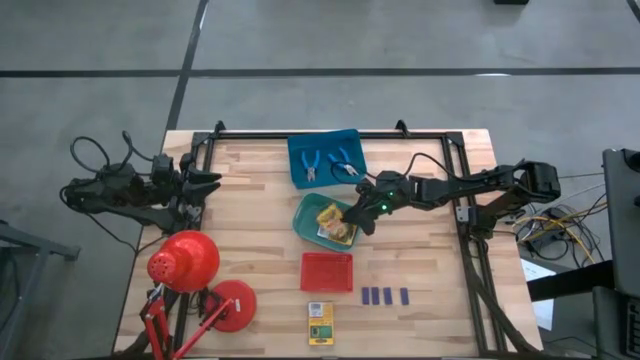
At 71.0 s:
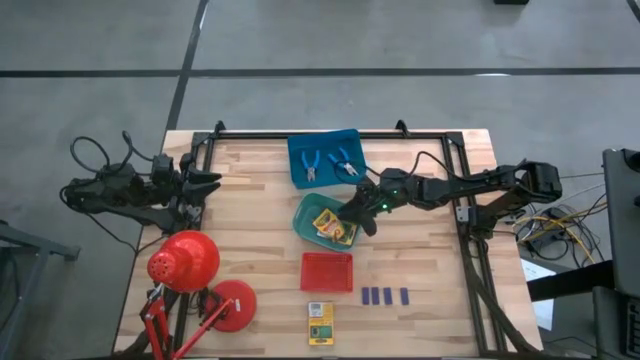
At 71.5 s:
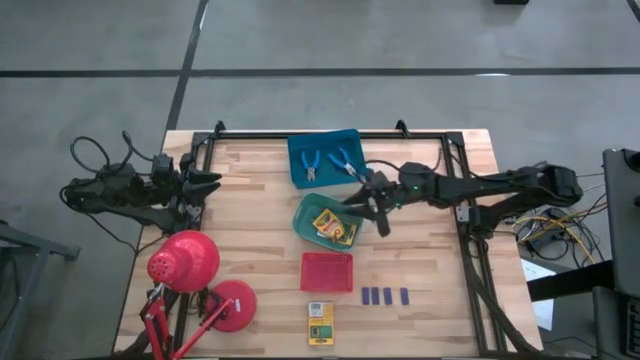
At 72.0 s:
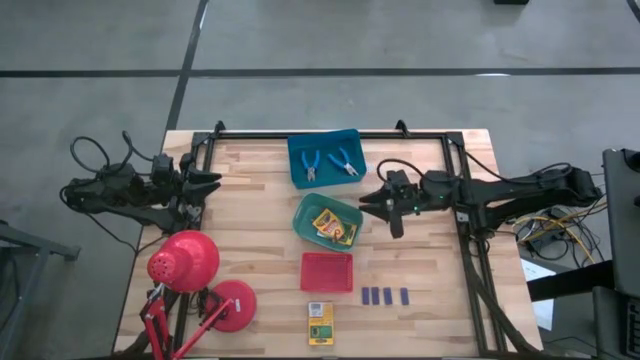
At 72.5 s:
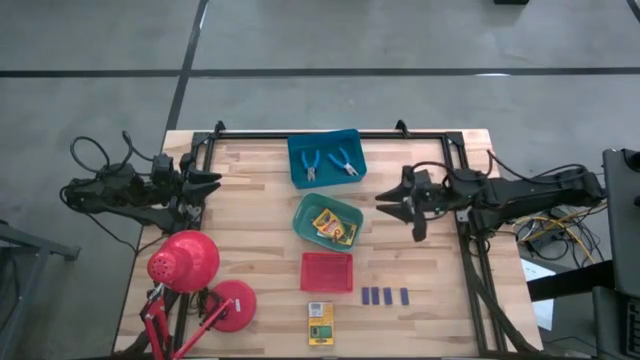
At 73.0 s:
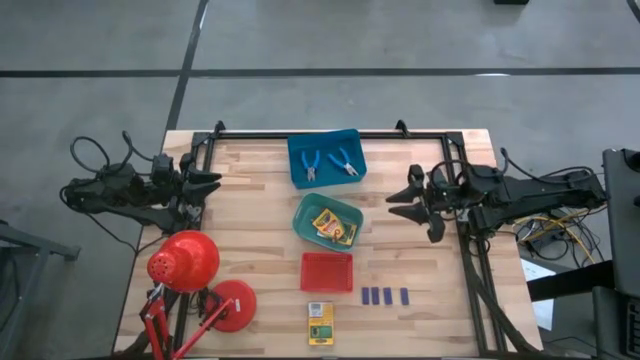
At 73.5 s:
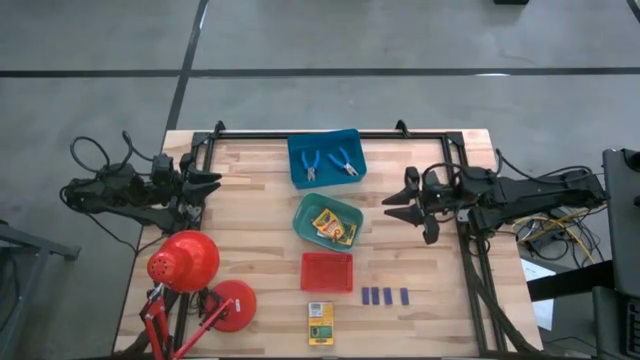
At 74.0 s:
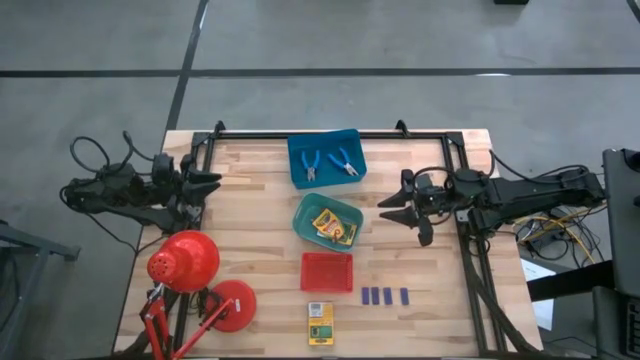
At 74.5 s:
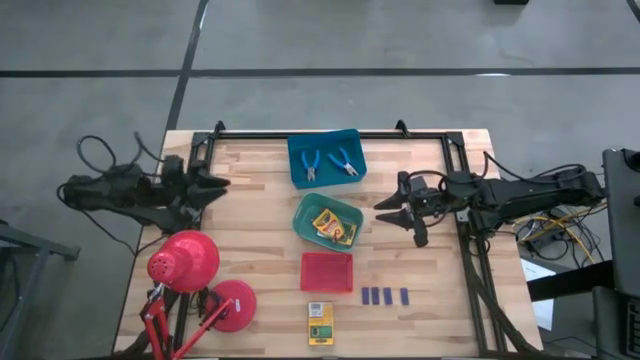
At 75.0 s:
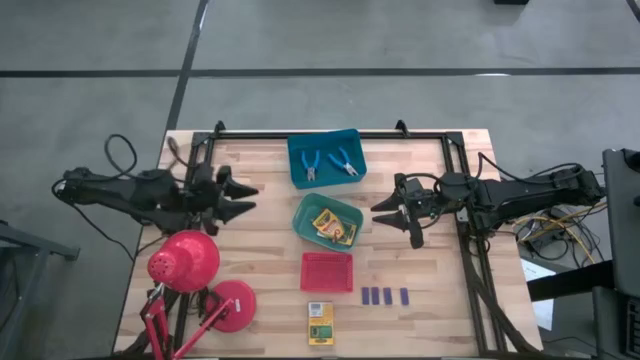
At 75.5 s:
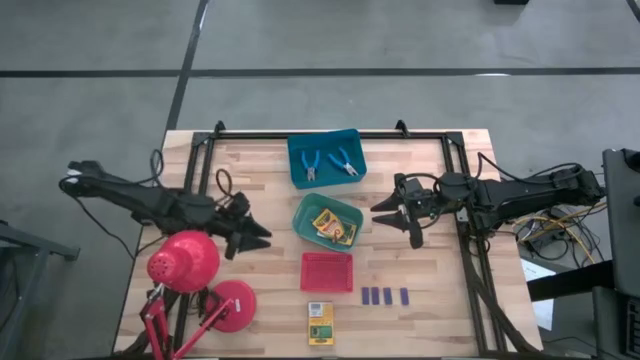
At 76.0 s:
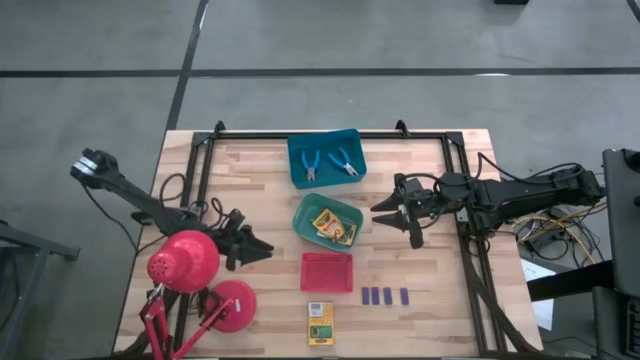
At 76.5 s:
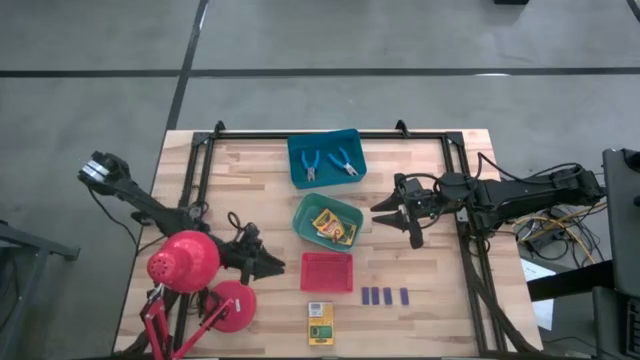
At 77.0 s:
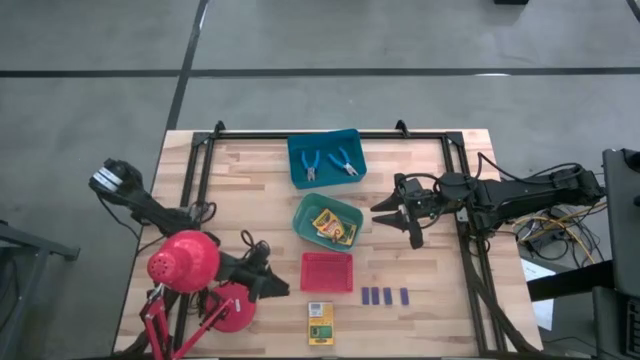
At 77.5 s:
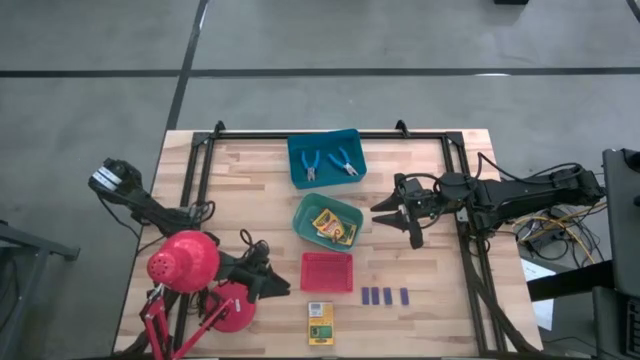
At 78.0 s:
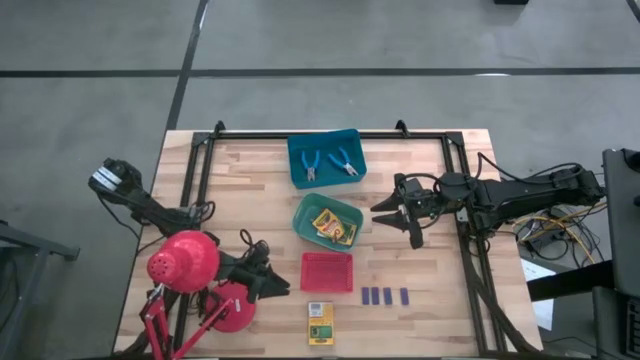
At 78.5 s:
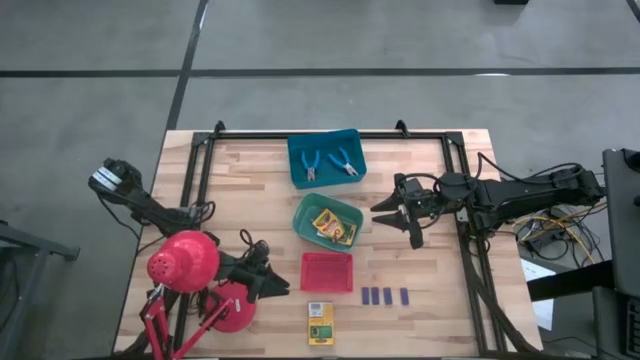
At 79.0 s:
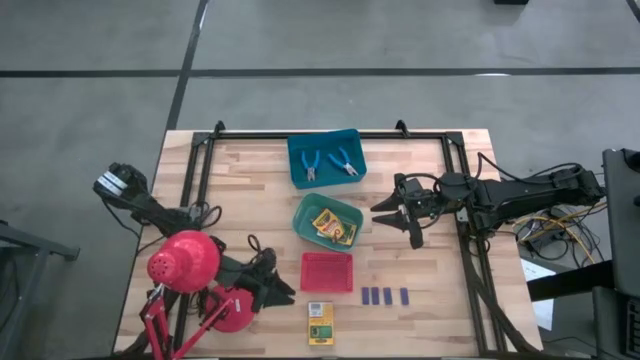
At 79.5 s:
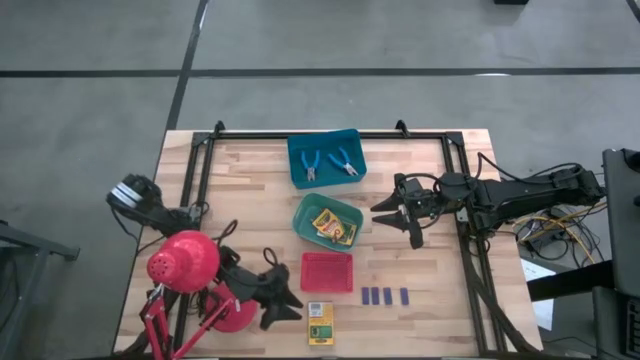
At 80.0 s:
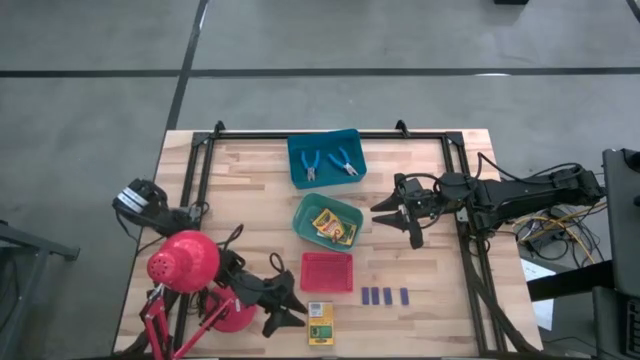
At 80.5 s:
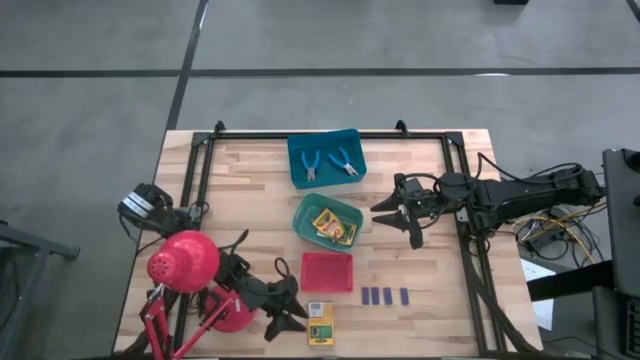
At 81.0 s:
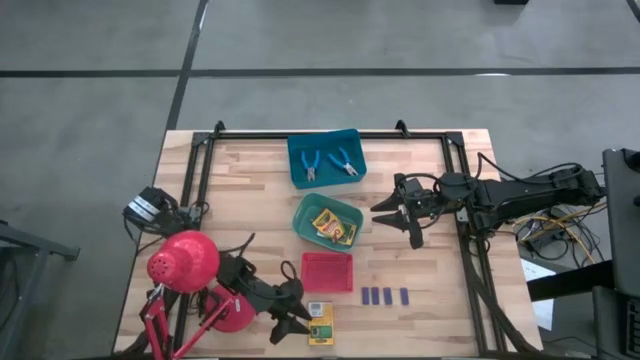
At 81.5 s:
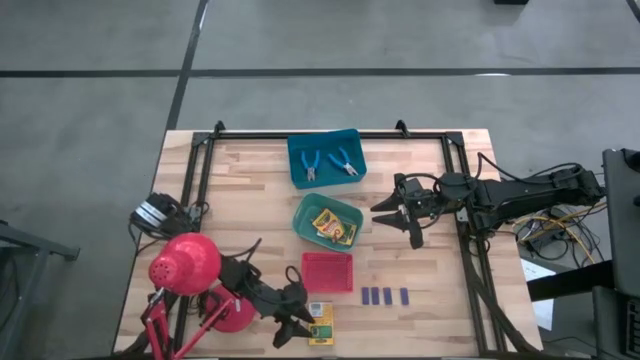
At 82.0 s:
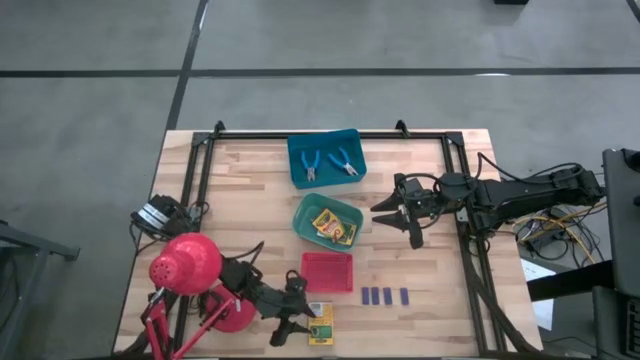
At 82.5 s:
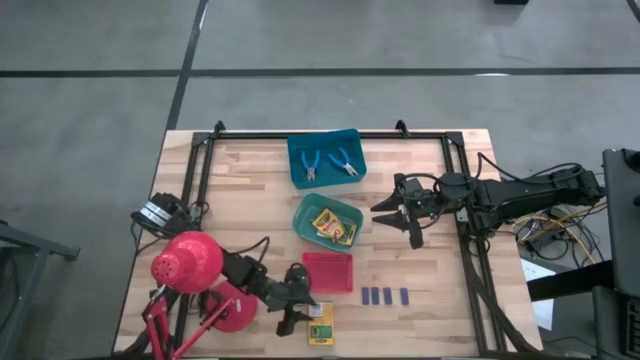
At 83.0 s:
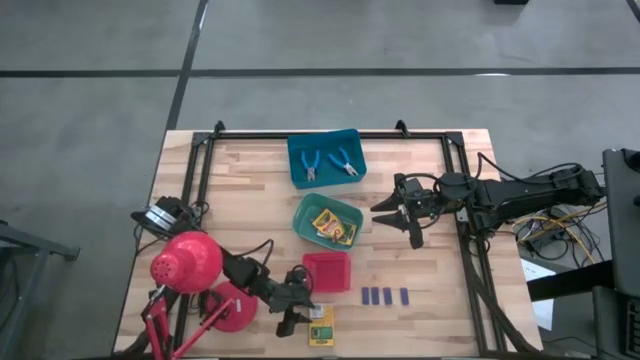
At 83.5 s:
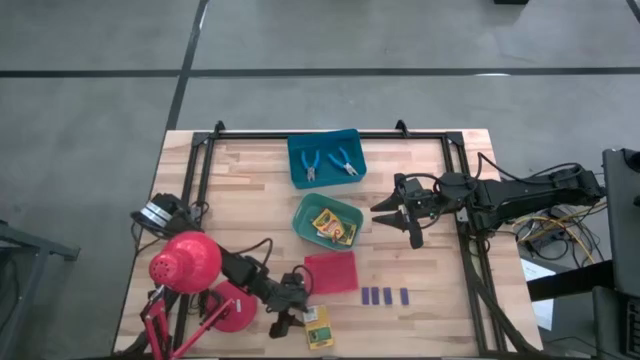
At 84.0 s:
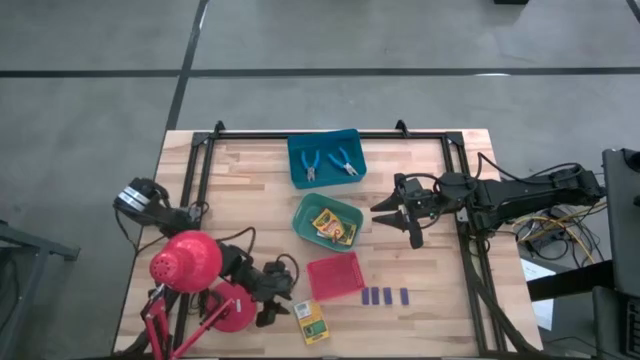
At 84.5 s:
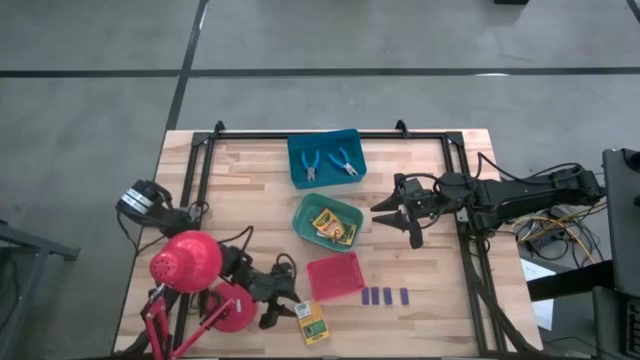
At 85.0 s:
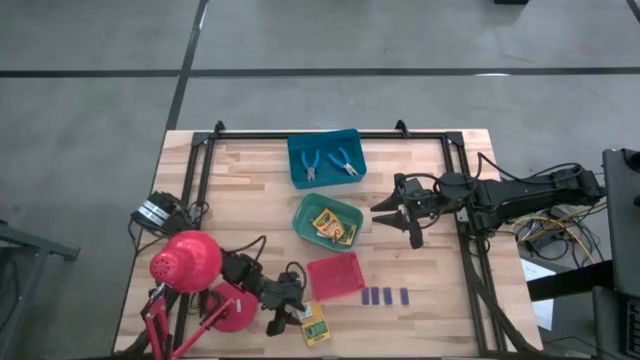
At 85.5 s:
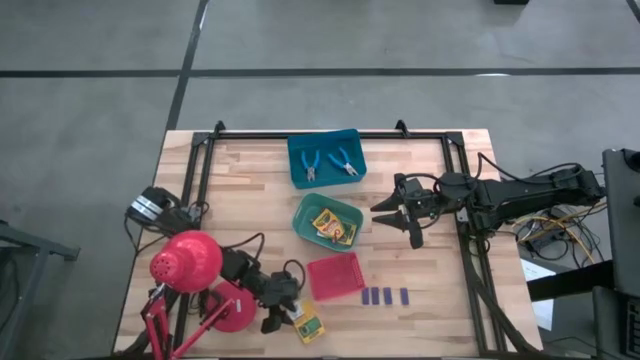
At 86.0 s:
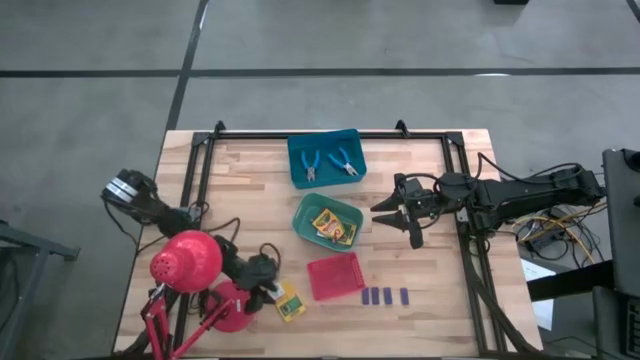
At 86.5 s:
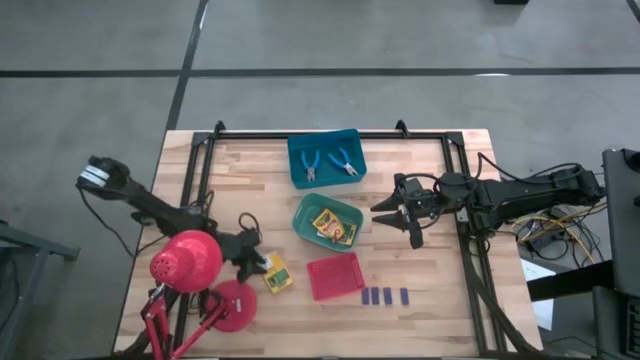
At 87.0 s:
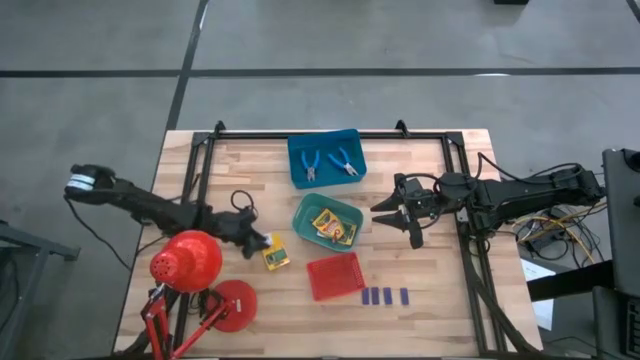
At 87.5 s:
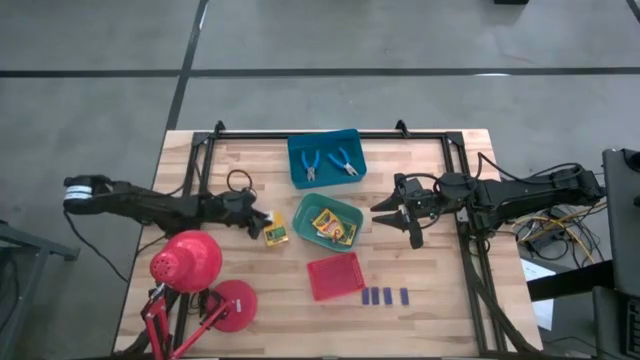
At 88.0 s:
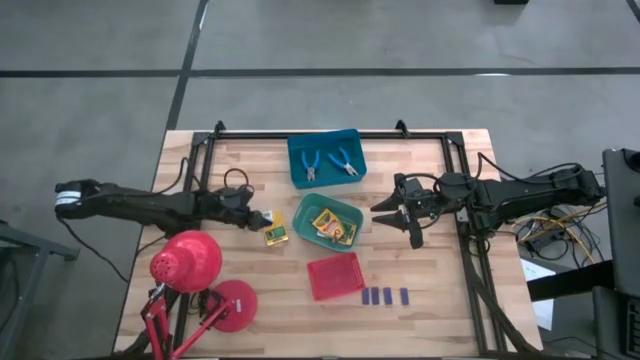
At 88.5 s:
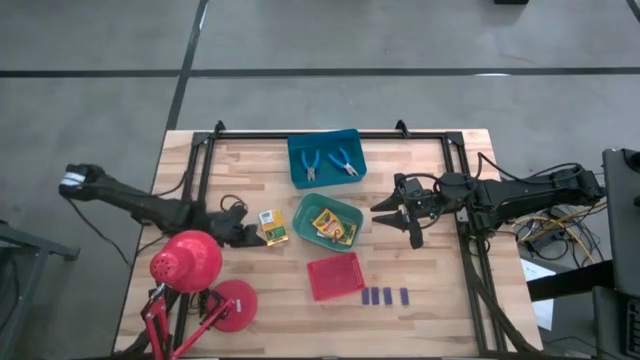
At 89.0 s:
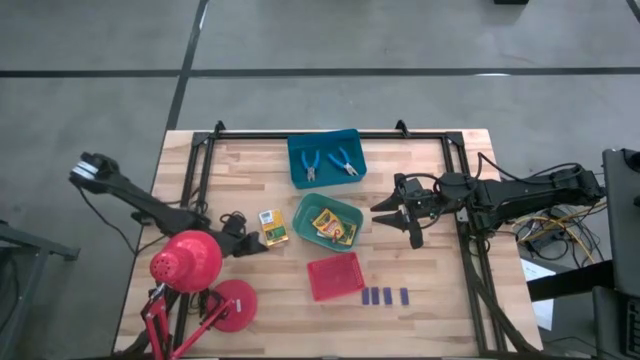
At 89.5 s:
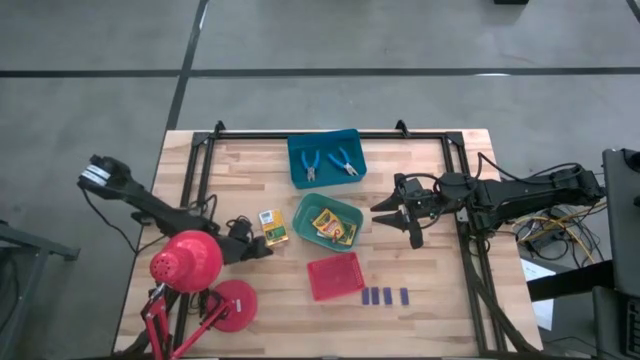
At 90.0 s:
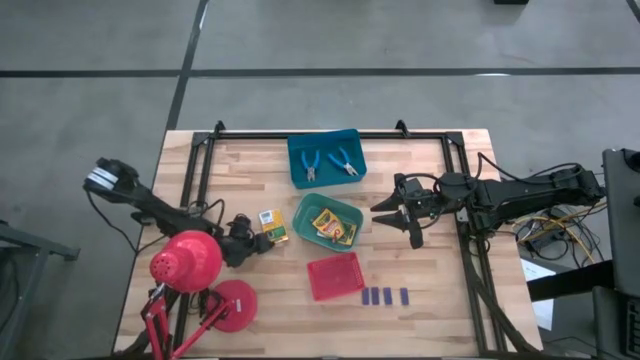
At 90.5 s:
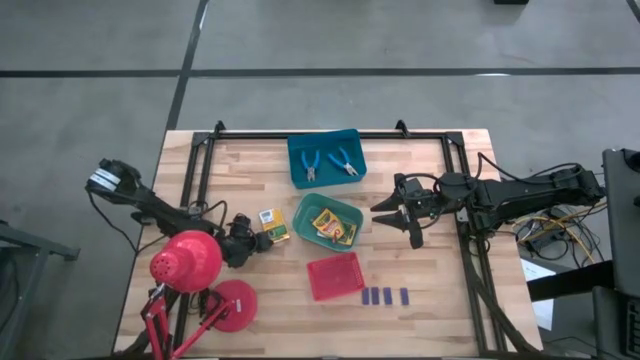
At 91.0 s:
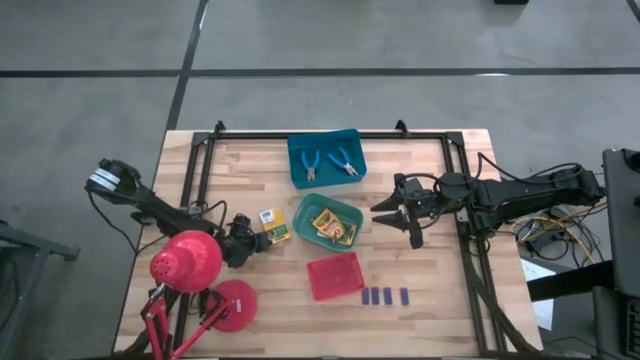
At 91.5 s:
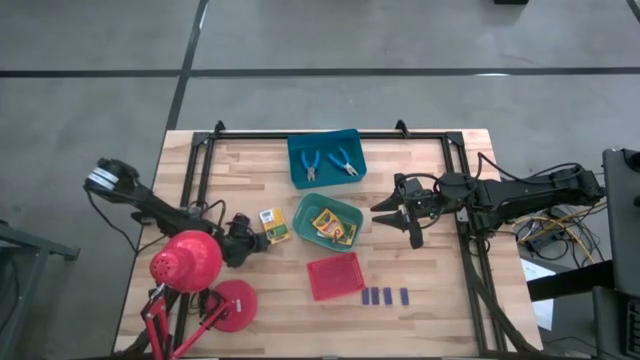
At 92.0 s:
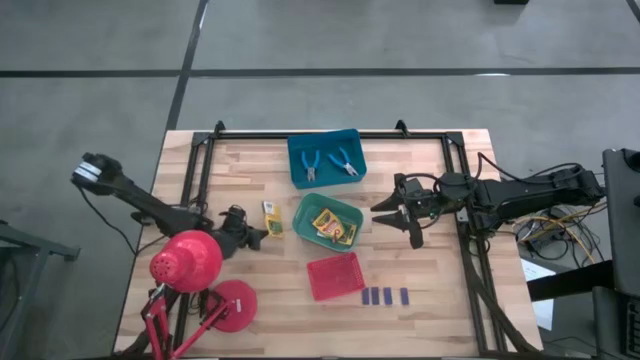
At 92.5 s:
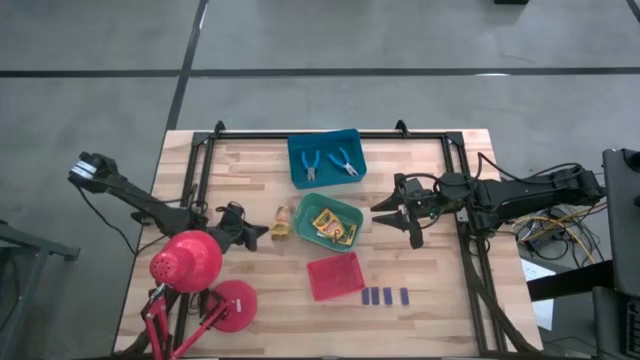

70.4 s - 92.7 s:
Task: Pick & Place School Supplies
Put the yellow crayon box in the green bin
